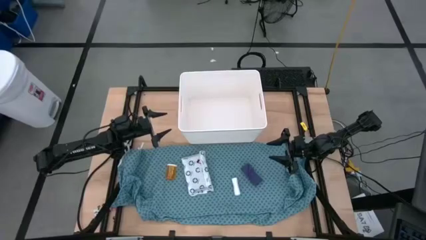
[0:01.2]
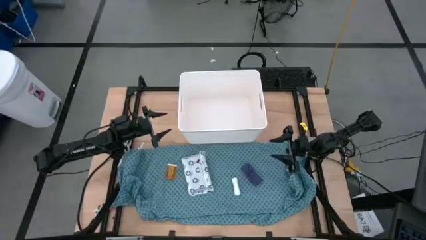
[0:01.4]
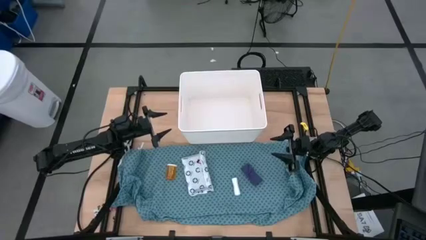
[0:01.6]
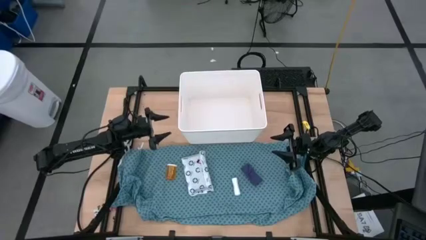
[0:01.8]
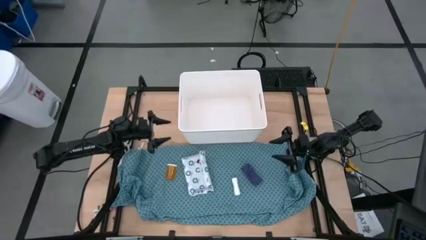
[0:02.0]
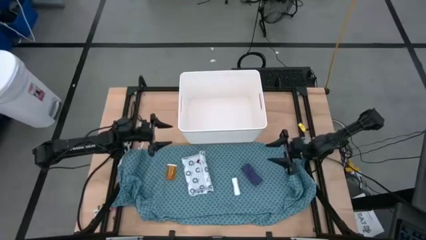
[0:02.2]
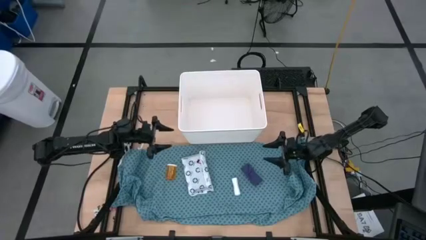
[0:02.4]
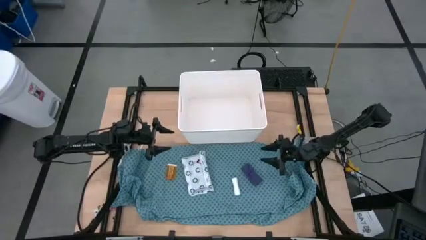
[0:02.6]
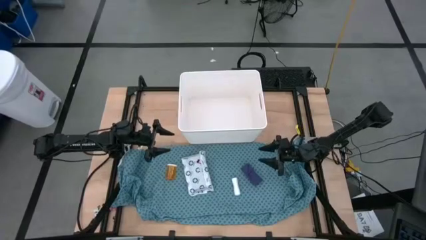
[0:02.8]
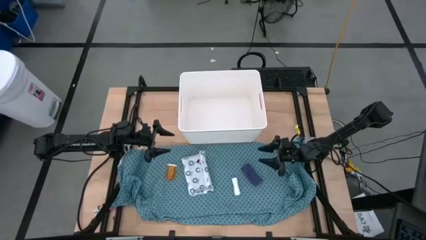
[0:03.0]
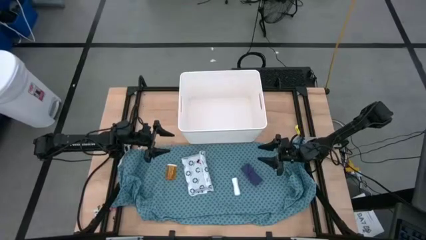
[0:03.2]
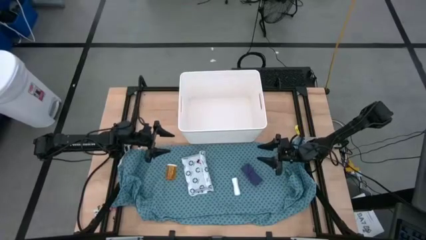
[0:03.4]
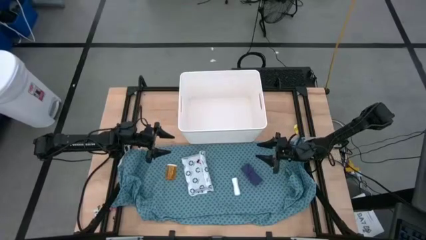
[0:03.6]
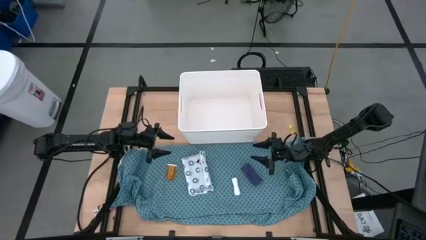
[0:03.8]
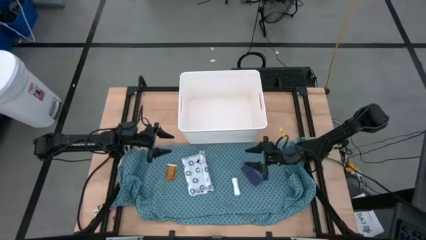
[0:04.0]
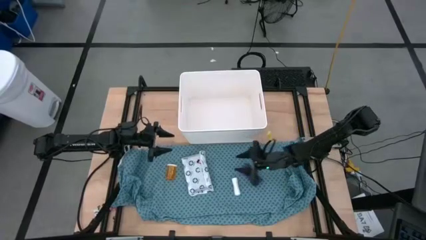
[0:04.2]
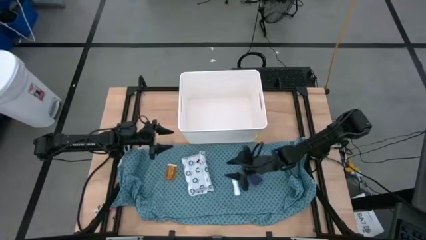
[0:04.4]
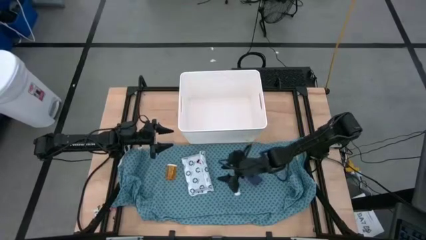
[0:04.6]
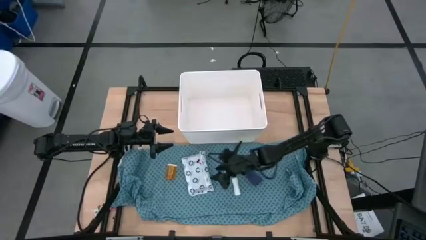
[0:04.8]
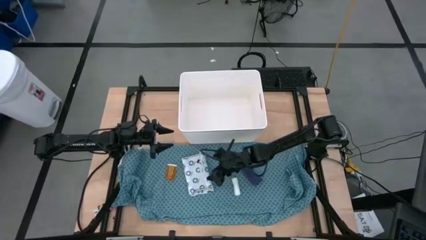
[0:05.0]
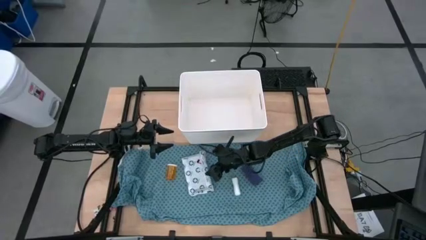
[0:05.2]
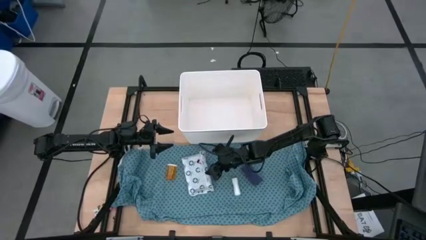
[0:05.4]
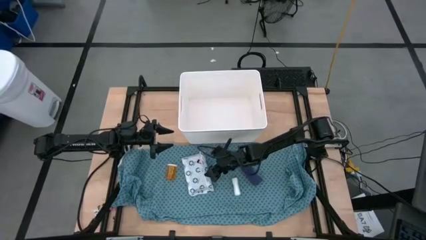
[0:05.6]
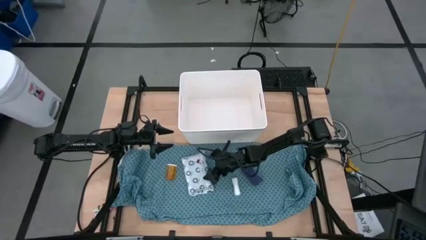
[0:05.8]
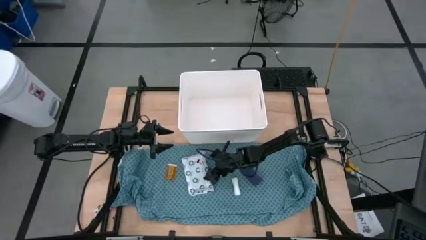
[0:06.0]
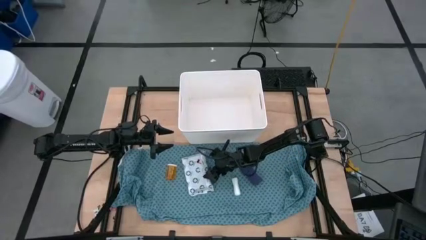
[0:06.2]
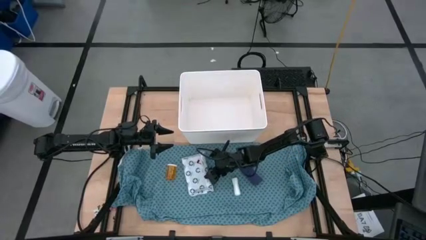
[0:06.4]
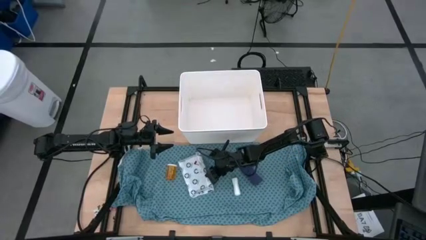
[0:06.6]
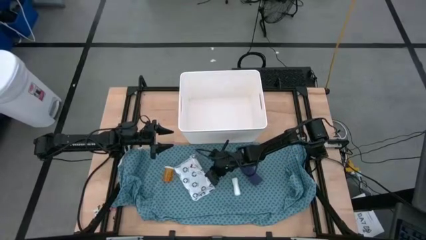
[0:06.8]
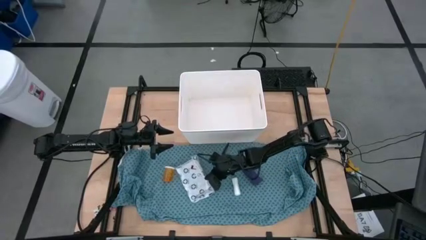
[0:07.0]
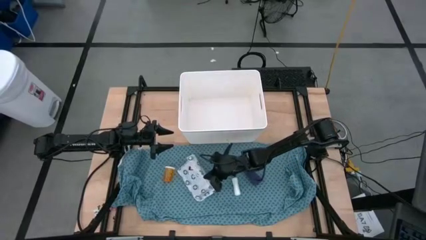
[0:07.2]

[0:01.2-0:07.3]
Task: Pick & place medical supplies in basket/bin
Put the white mailer bag into the white bin

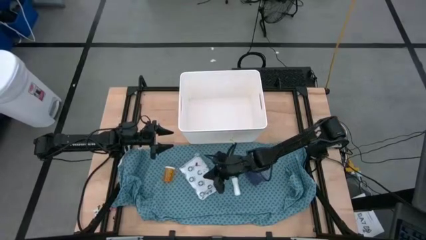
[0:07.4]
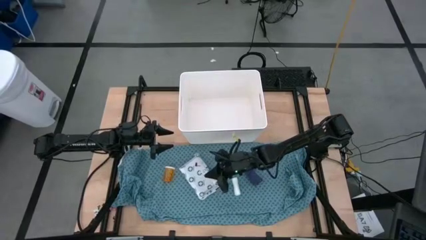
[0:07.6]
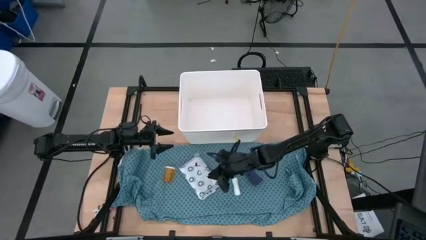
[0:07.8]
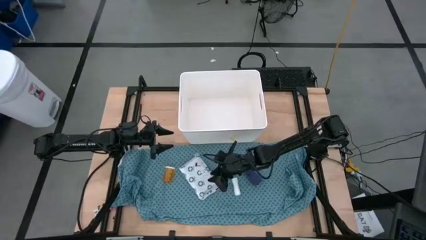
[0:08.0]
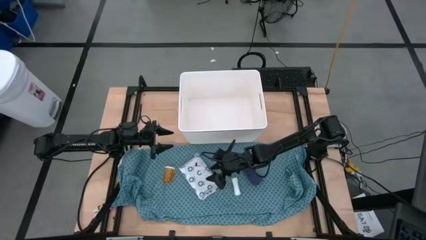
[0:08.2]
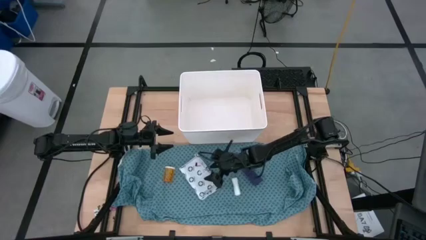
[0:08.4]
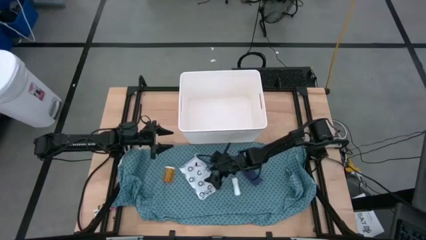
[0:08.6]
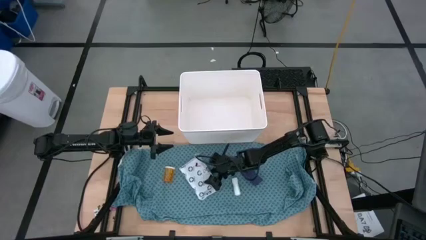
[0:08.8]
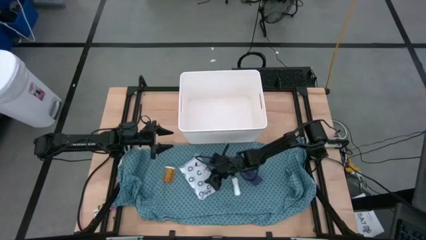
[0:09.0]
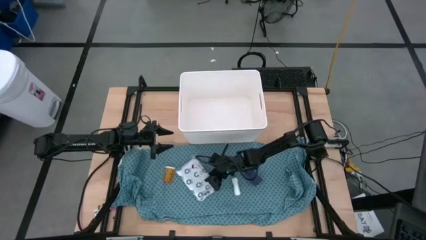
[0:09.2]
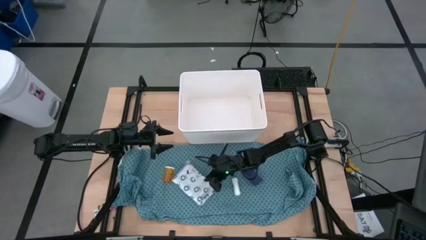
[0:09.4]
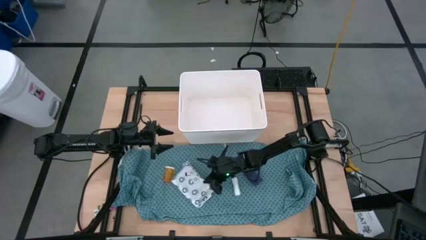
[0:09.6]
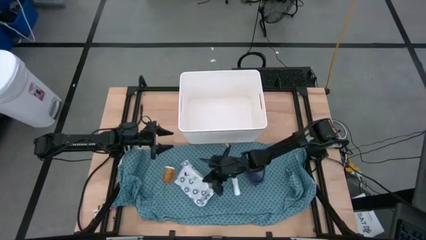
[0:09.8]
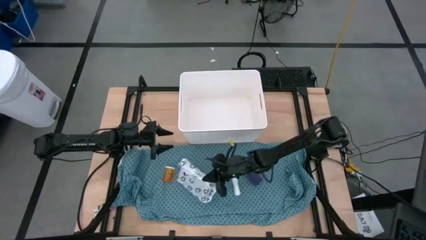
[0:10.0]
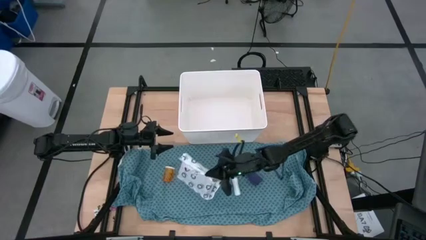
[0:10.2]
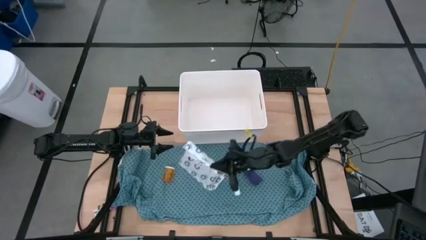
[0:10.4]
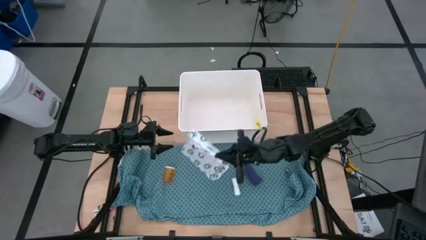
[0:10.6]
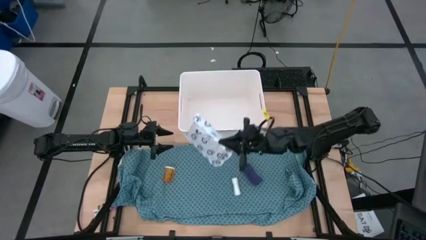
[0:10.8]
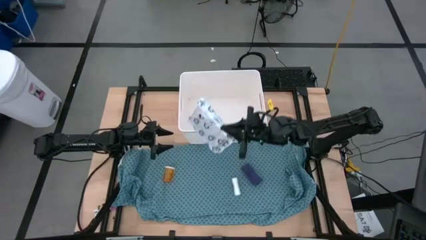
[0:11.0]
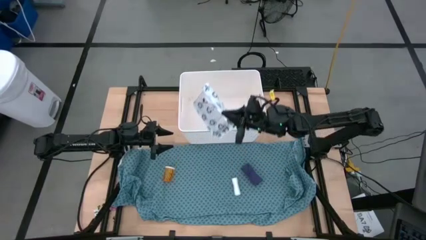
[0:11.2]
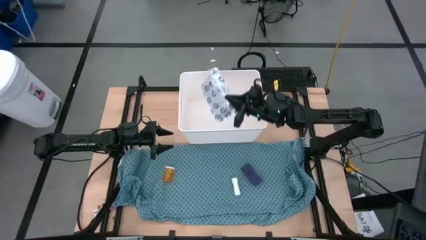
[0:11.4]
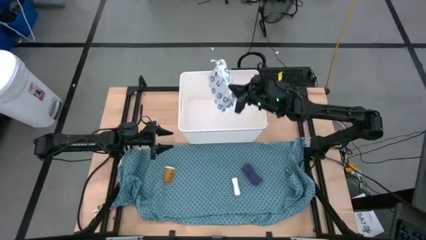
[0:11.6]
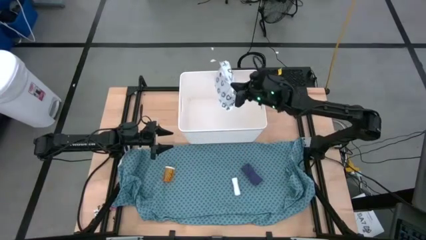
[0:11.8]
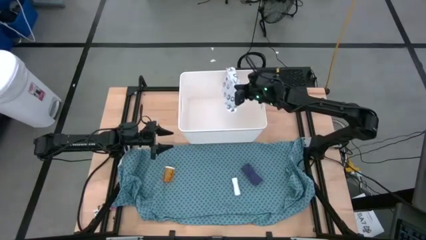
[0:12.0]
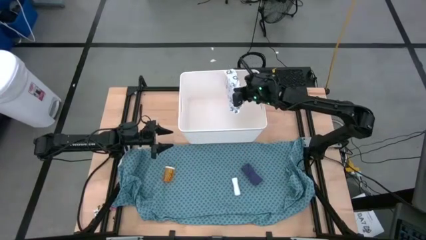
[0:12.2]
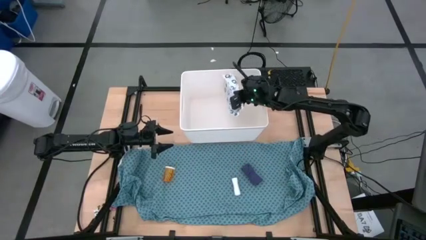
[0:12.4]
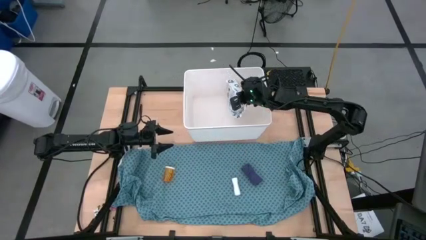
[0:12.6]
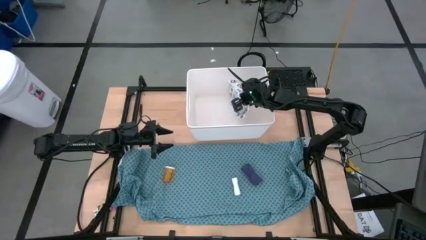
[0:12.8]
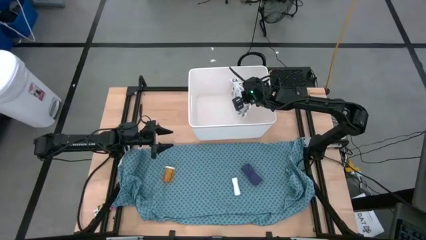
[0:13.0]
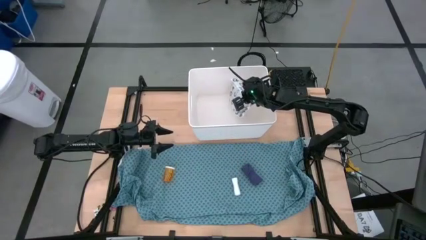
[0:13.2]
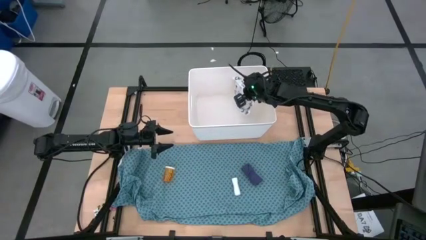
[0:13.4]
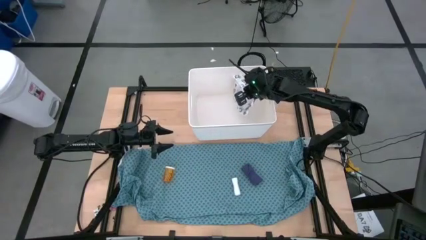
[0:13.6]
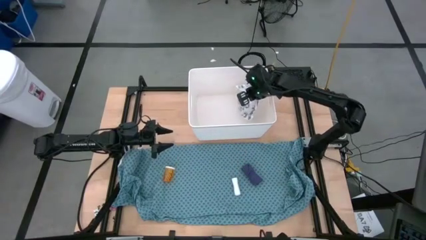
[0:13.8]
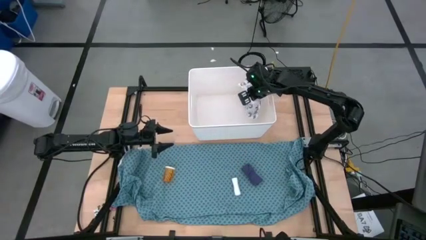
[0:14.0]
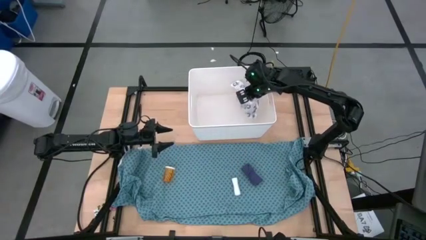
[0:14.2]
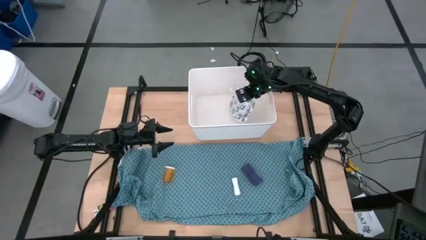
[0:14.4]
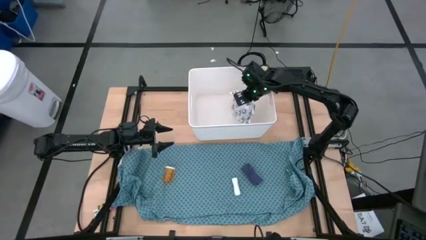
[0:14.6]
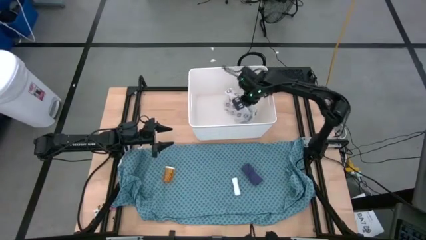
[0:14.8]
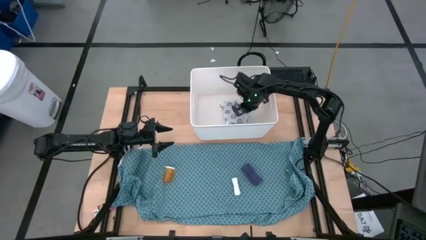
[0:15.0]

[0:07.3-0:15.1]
Put the white mailer bag into the white bin

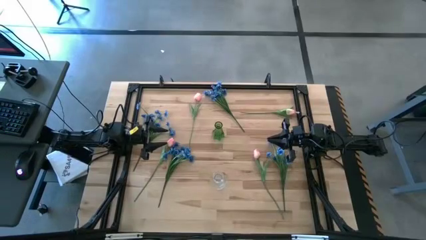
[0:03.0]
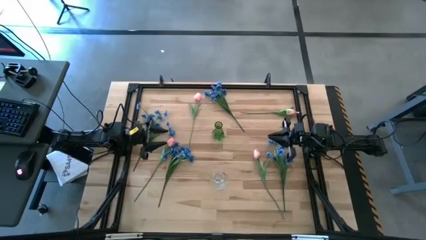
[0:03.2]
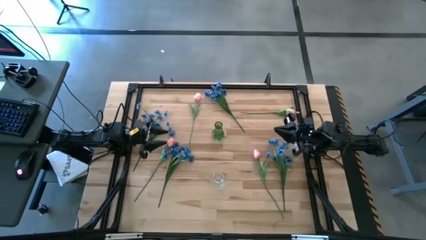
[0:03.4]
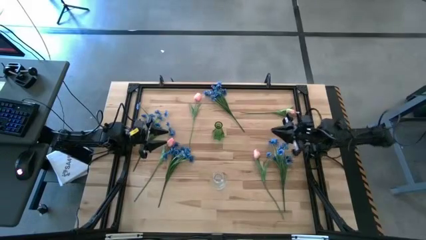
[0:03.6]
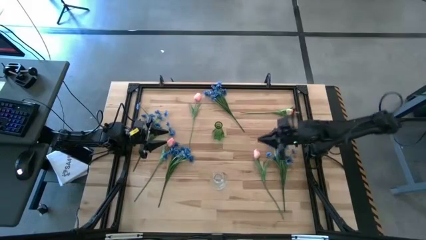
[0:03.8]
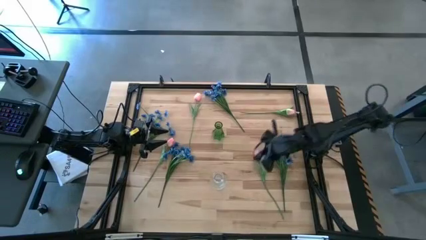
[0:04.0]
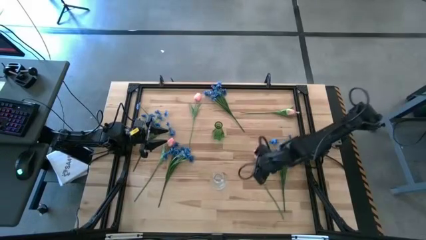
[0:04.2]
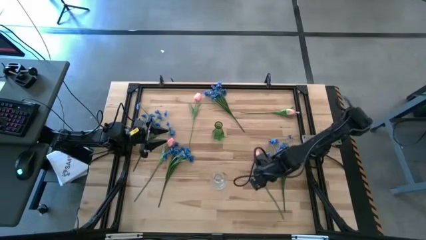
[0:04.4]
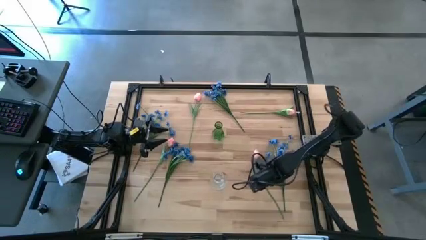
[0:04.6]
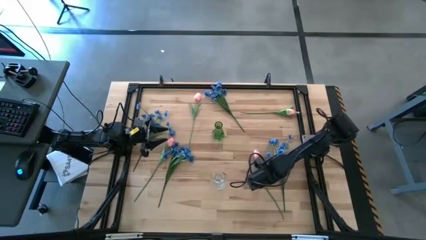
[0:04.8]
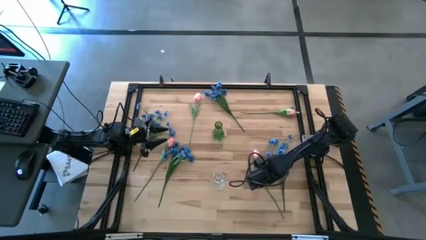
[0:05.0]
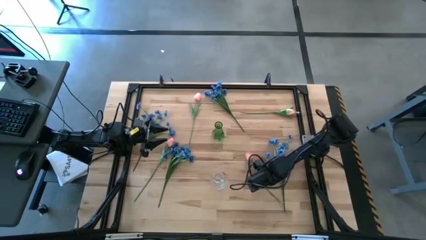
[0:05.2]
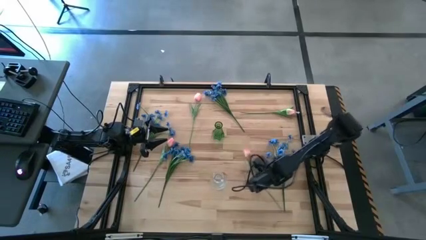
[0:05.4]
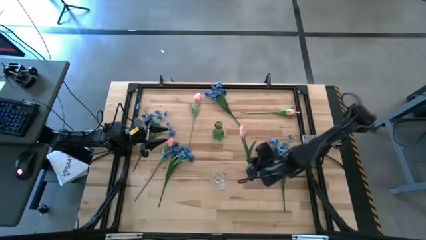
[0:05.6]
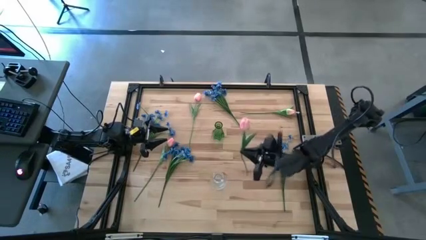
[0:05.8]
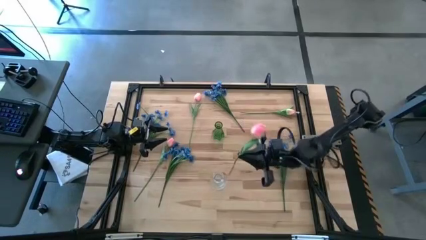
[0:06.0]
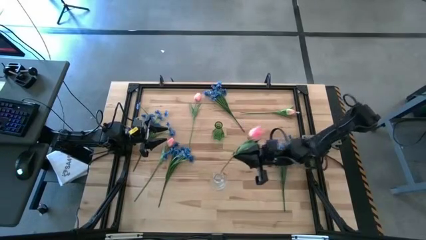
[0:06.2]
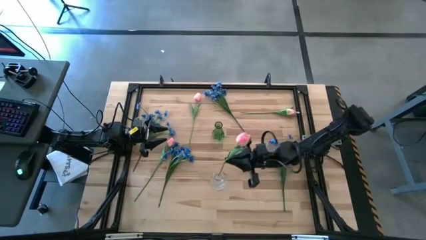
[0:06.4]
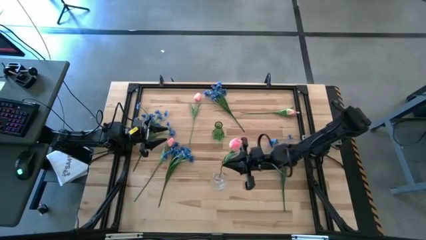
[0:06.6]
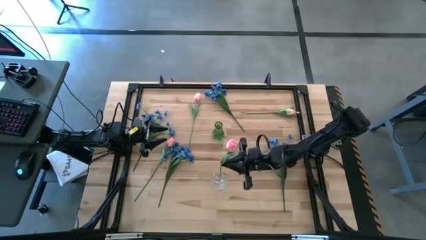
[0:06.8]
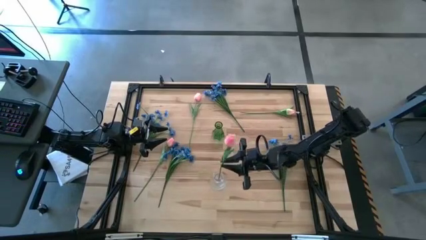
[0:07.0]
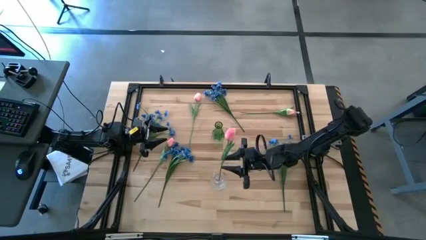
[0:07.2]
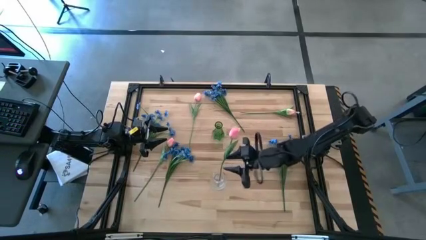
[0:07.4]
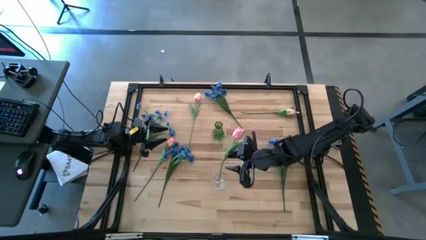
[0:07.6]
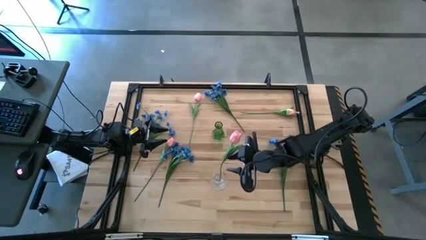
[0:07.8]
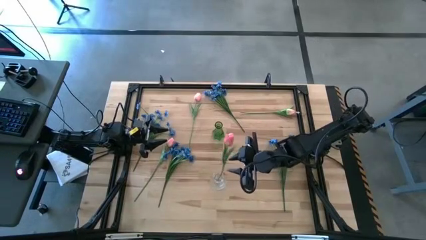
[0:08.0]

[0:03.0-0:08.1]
Task: Sort flowers into vase by color
Put the bottom right pink tulip into the transparent vase
